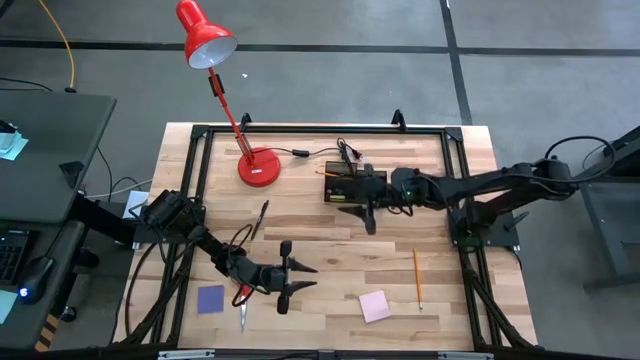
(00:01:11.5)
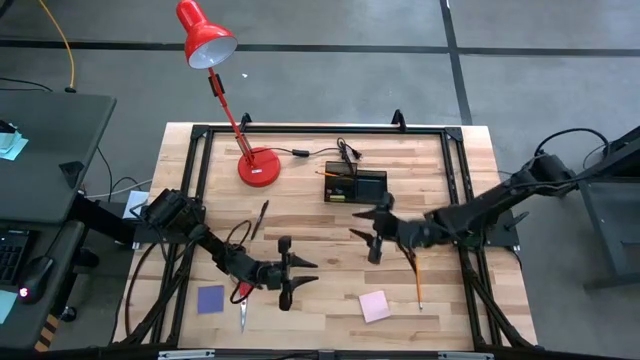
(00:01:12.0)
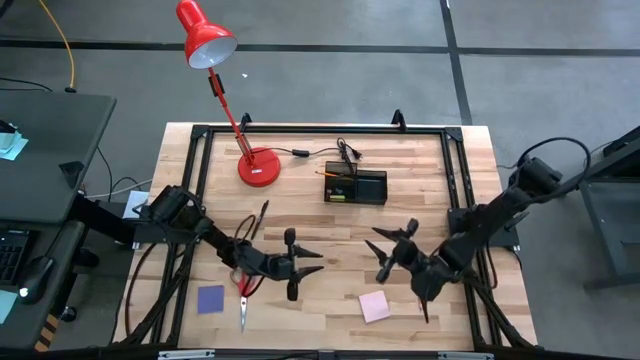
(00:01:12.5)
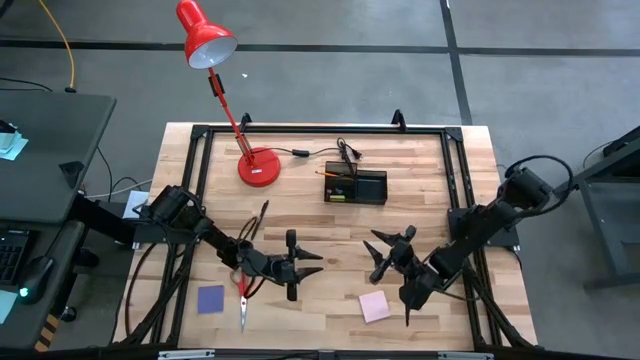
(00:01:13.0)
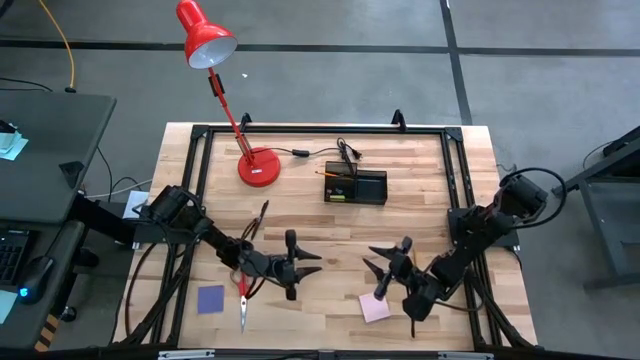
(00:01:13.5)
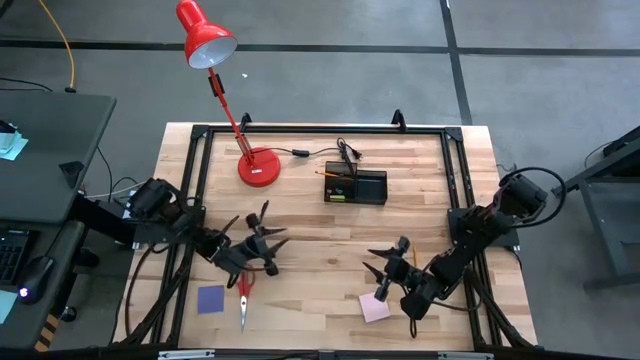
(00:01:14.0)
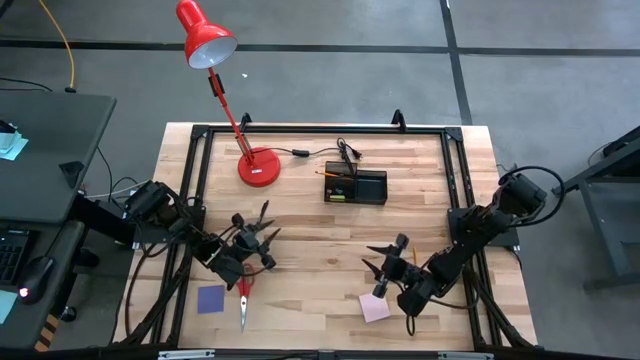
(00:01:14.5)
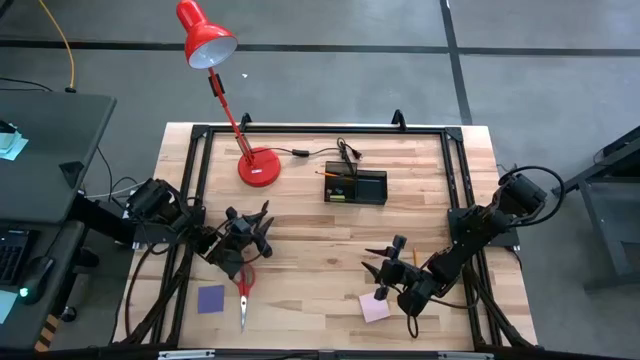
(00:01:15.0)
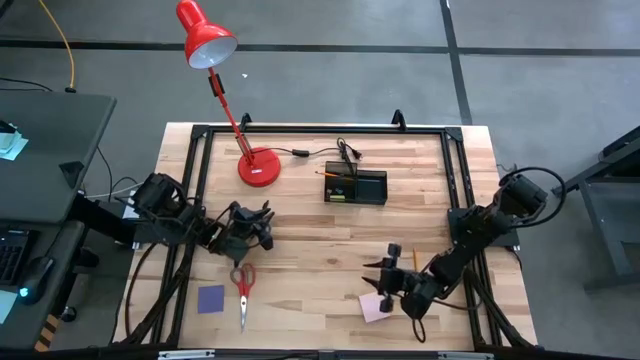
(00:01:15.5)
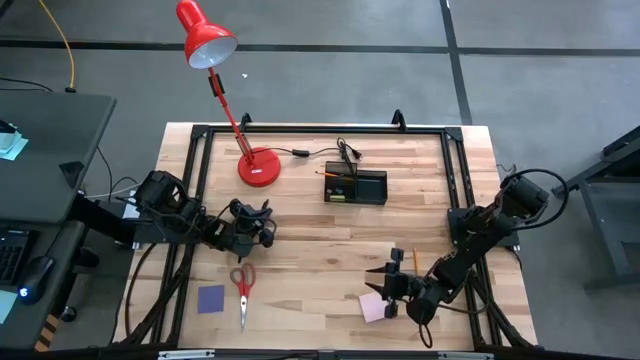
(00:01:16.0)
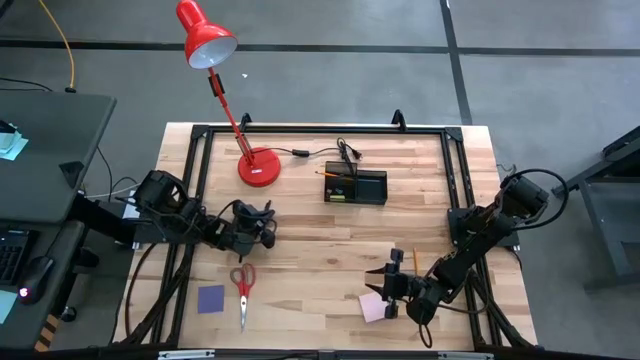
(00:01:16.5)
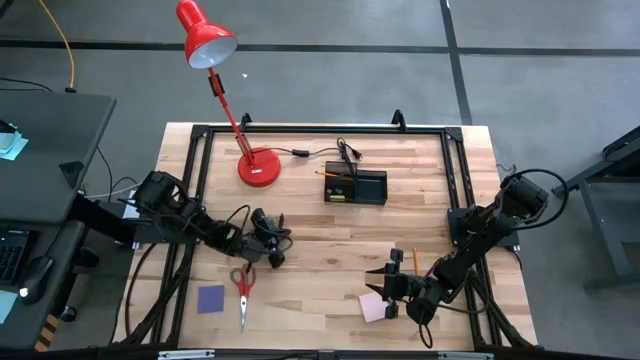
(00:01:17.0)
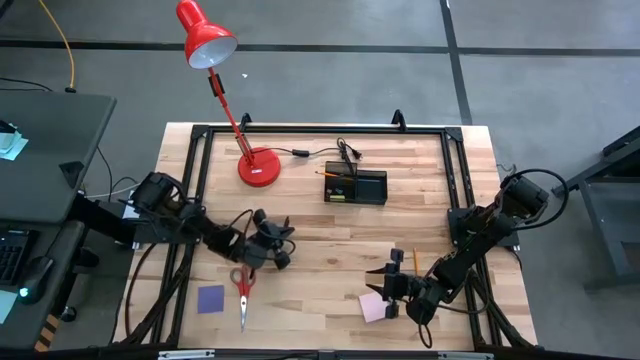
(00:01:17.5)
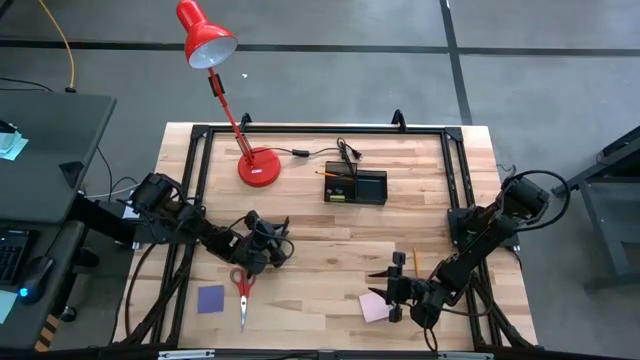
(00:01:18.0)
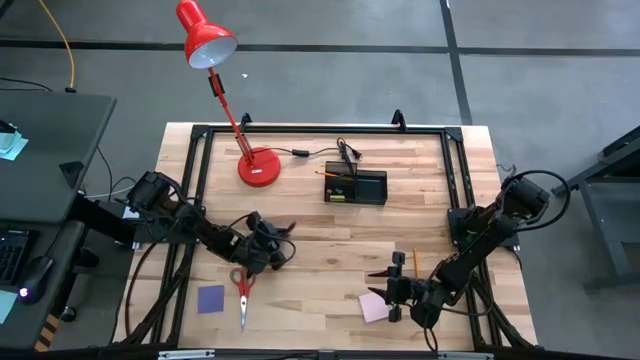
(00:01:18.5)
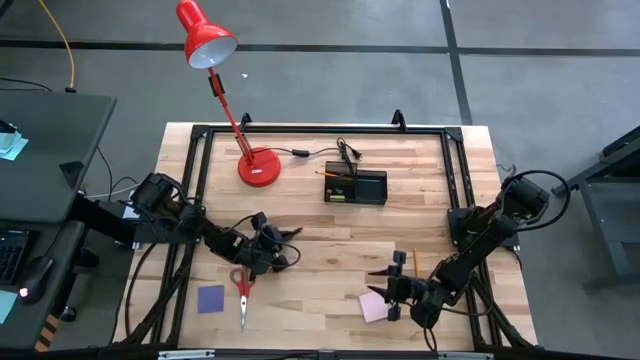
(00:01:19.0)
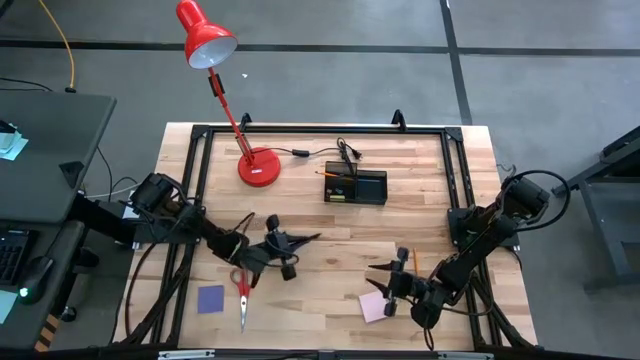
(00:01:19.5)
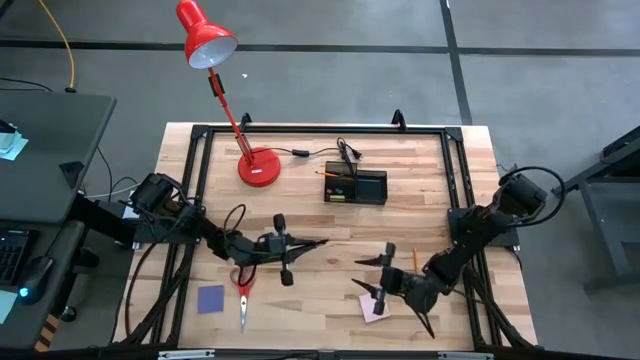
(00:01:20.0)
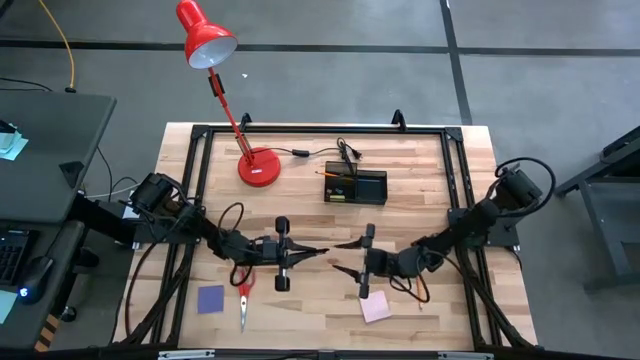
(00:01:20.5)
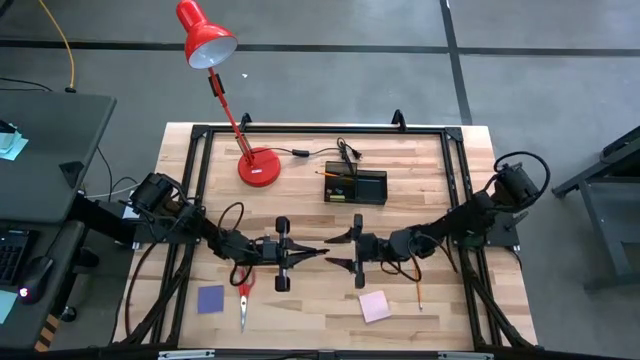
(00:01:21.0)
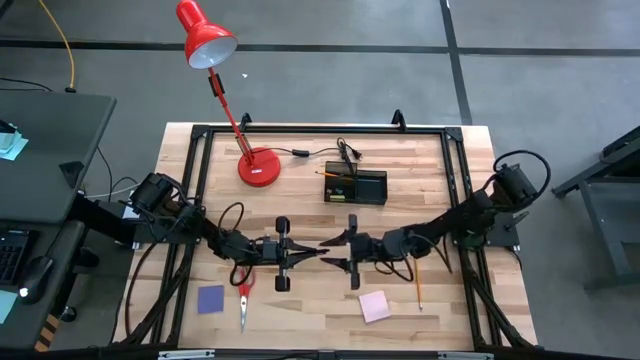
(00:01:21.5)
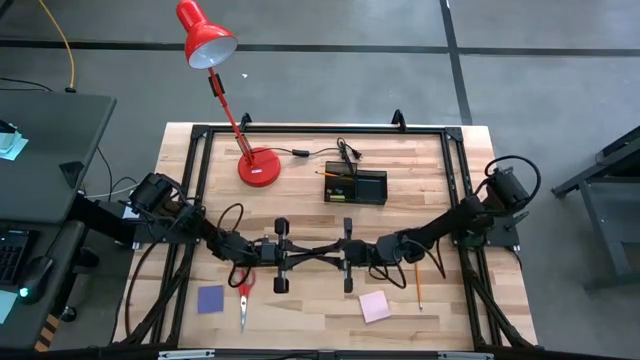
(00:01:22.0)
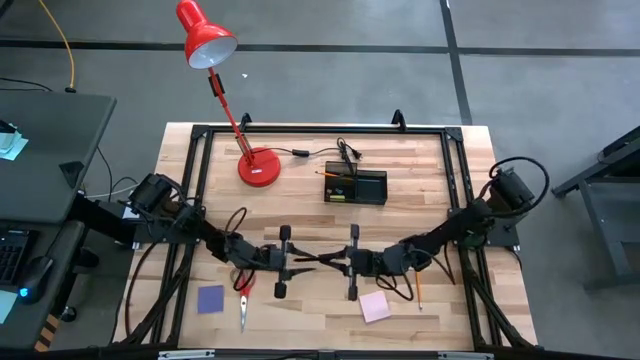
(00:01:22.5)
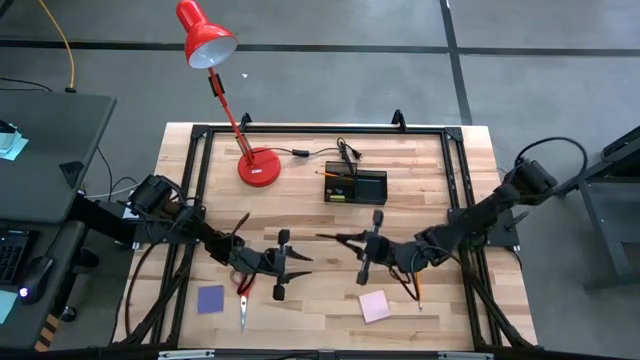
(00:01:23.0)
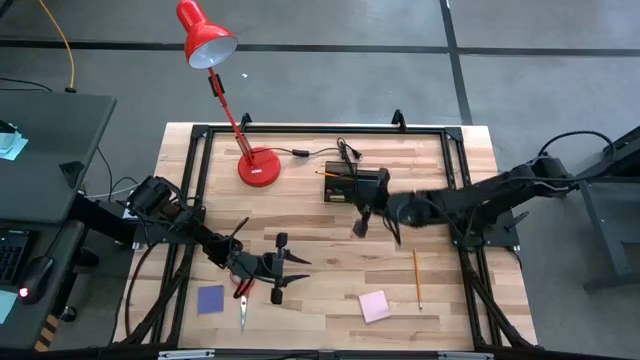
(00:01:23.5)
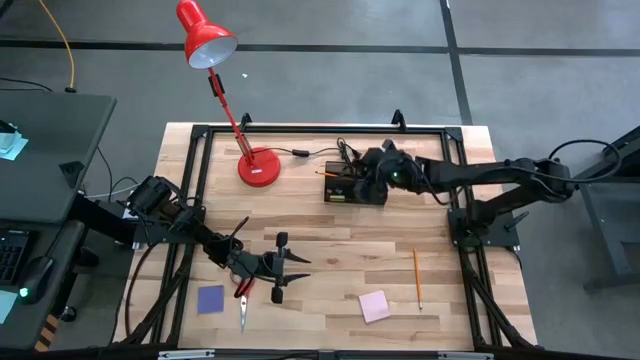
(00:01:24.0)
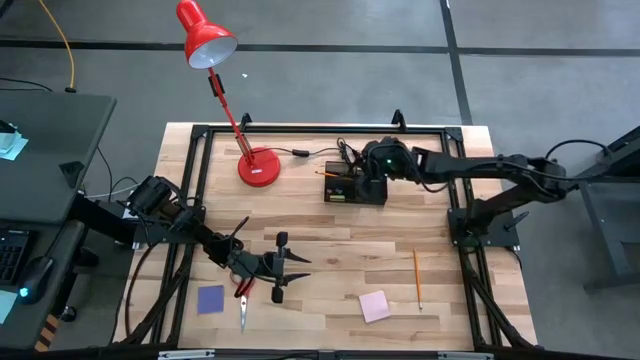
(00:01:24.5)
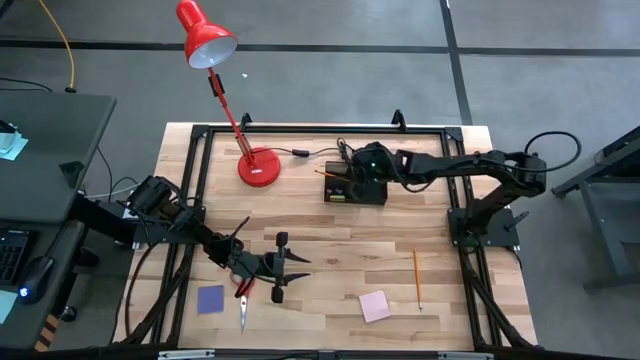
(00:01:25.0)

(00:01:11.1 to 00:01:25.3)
Task: Pick and place office supplies into organizer
Put the black pen into the desk organizer
